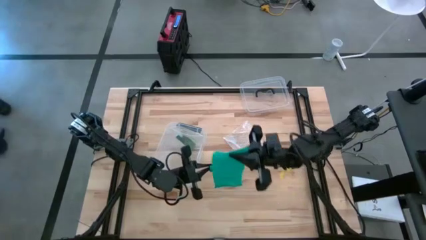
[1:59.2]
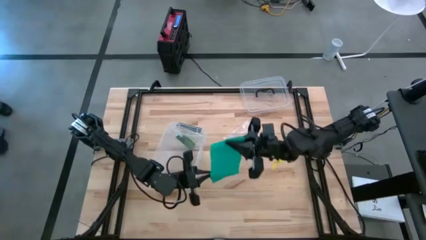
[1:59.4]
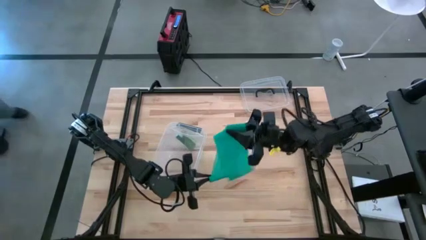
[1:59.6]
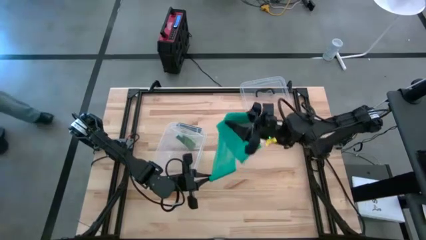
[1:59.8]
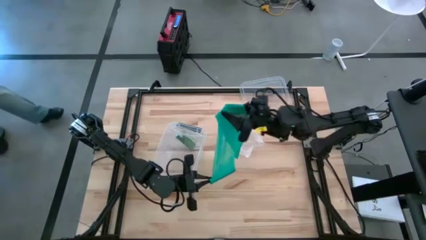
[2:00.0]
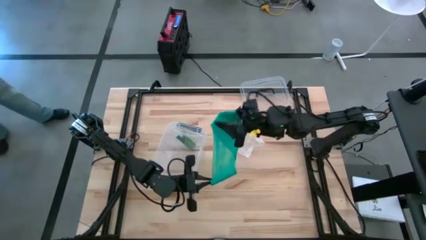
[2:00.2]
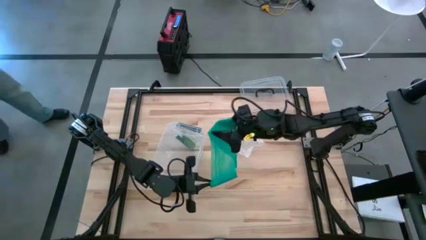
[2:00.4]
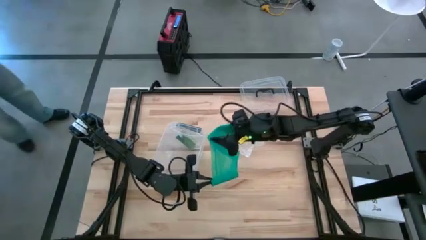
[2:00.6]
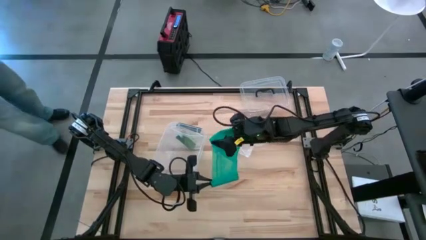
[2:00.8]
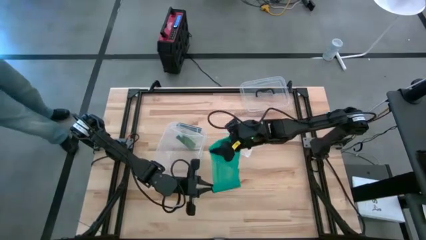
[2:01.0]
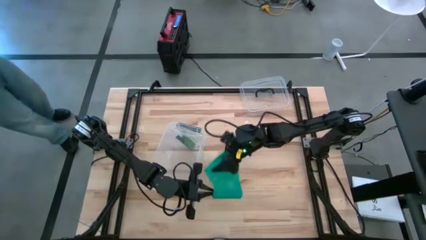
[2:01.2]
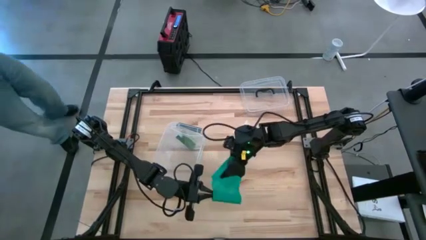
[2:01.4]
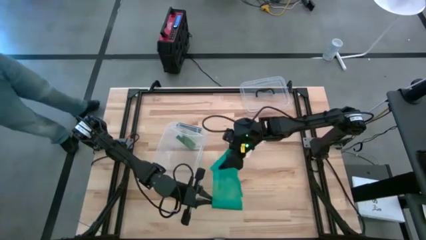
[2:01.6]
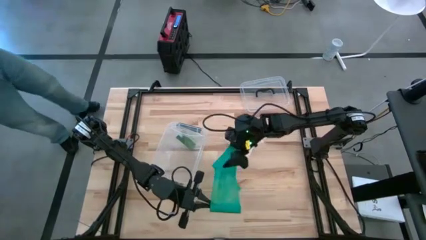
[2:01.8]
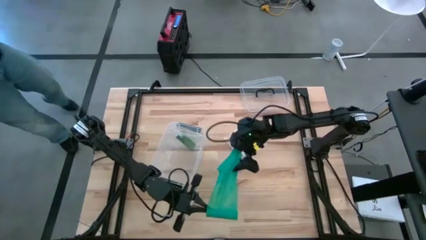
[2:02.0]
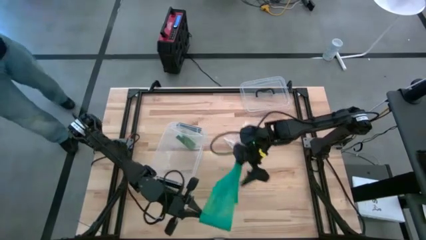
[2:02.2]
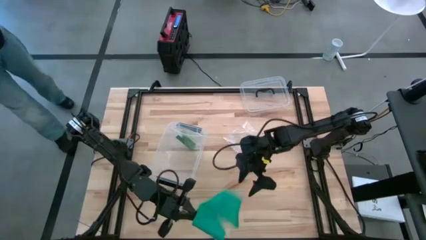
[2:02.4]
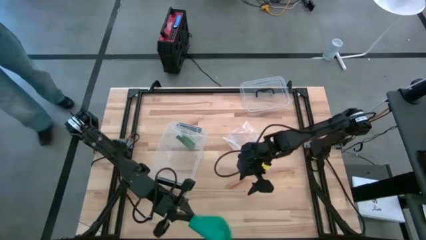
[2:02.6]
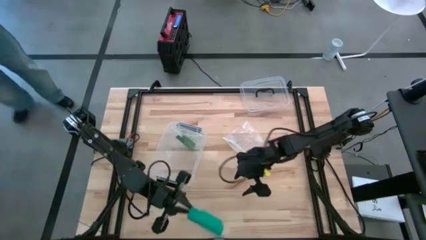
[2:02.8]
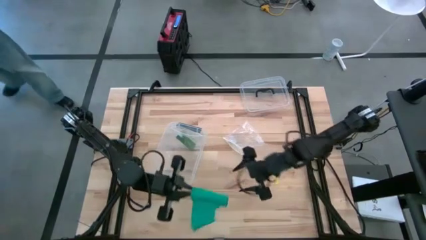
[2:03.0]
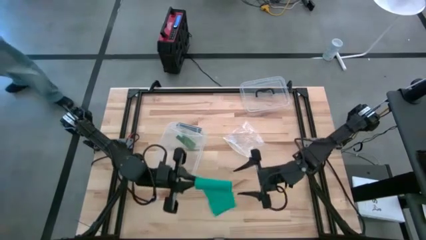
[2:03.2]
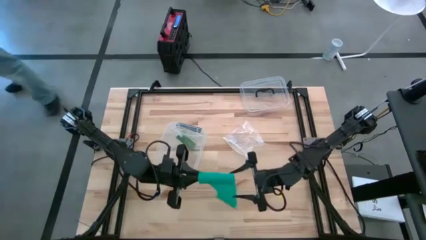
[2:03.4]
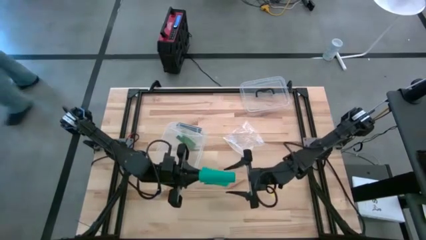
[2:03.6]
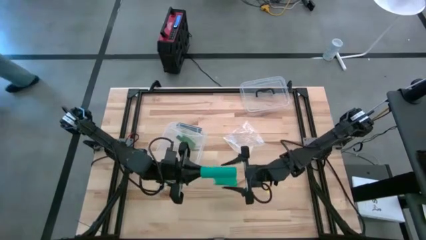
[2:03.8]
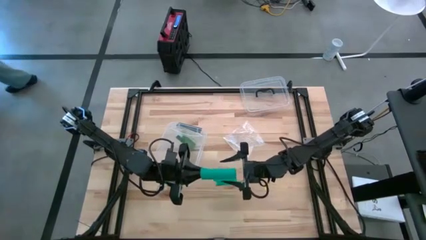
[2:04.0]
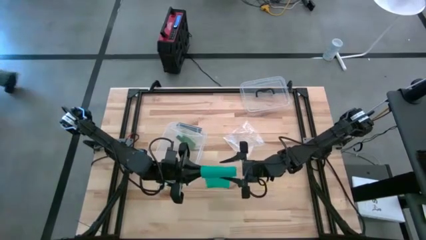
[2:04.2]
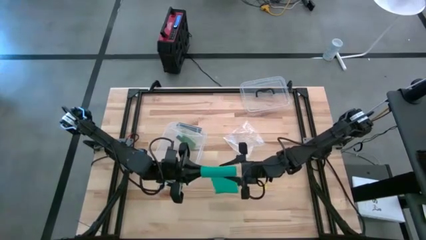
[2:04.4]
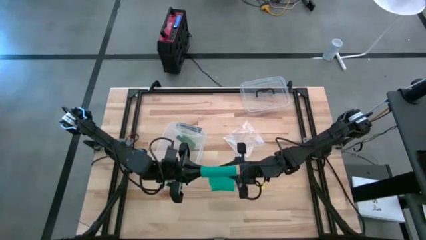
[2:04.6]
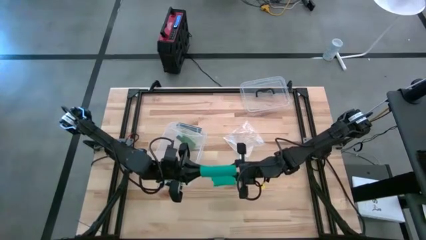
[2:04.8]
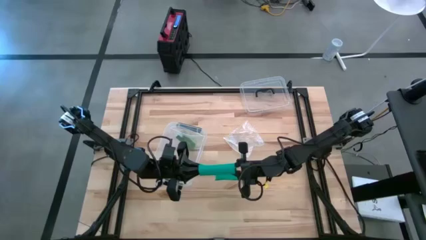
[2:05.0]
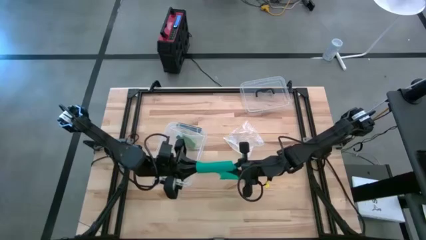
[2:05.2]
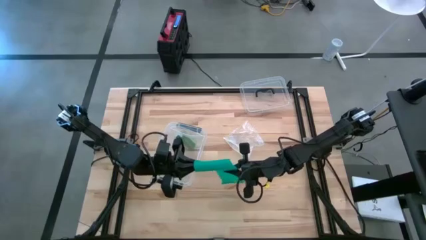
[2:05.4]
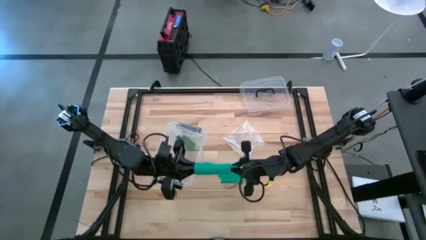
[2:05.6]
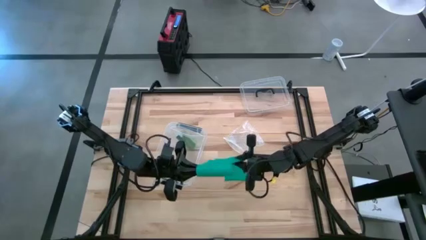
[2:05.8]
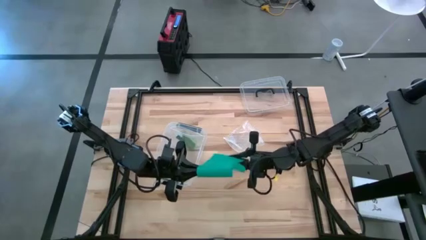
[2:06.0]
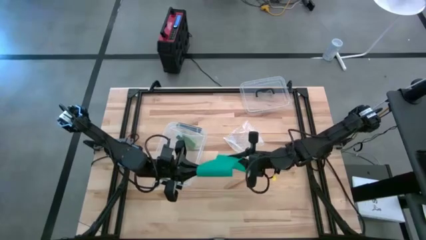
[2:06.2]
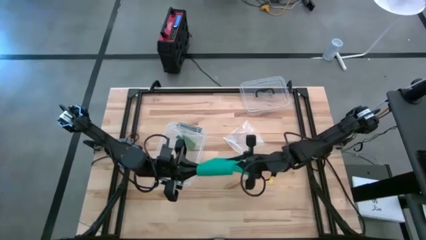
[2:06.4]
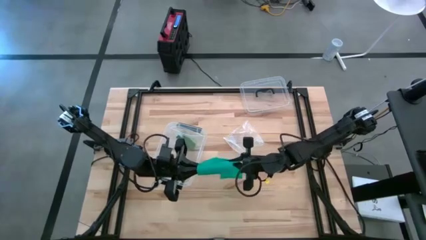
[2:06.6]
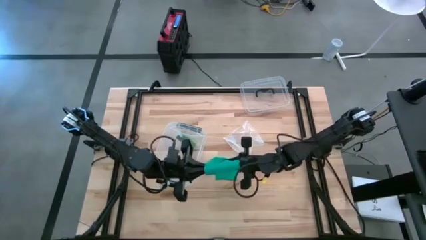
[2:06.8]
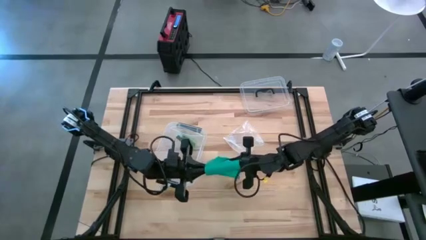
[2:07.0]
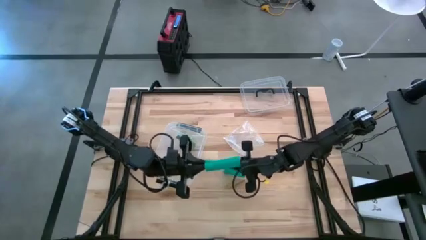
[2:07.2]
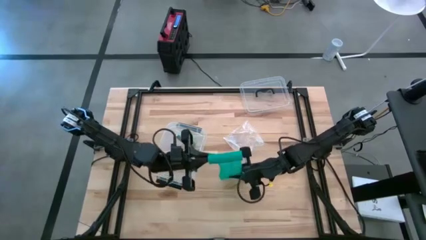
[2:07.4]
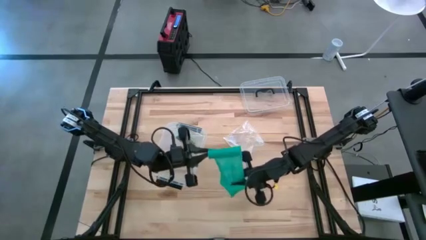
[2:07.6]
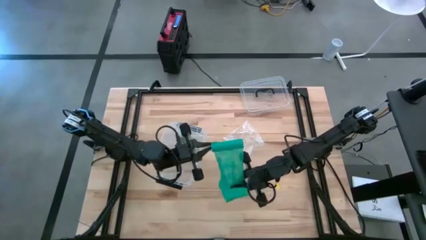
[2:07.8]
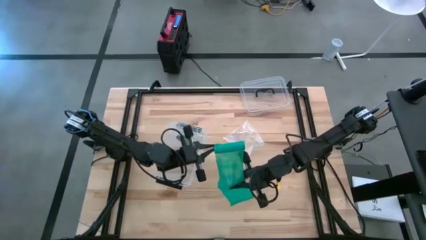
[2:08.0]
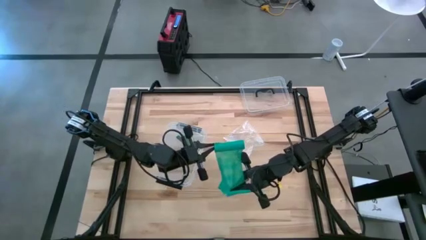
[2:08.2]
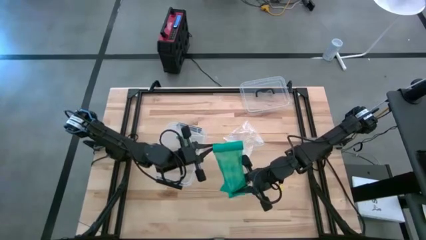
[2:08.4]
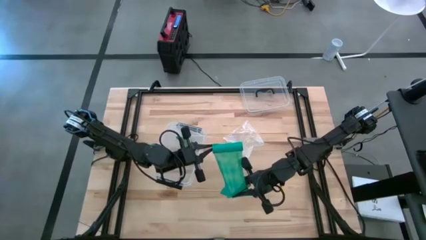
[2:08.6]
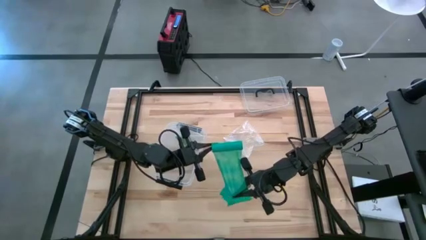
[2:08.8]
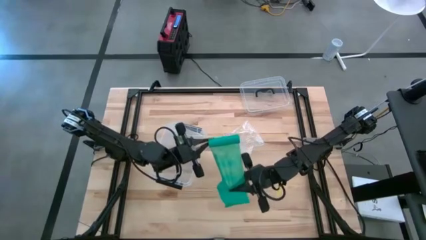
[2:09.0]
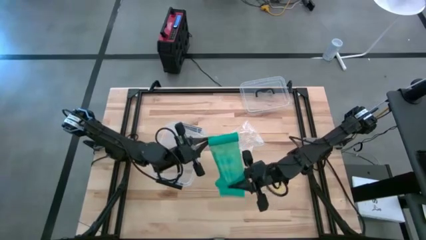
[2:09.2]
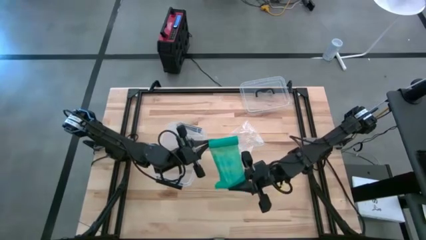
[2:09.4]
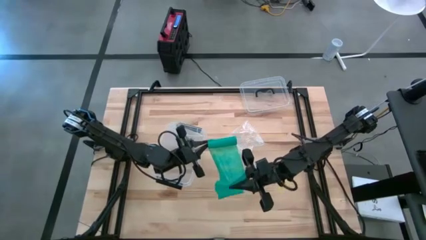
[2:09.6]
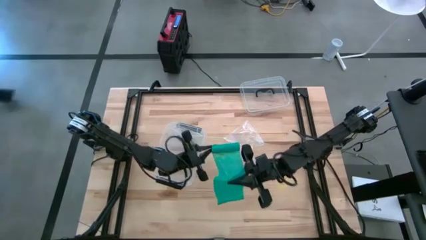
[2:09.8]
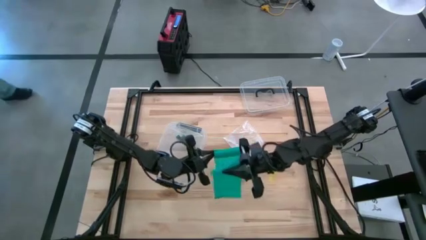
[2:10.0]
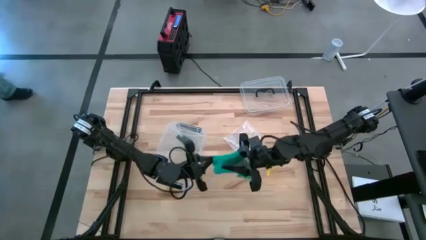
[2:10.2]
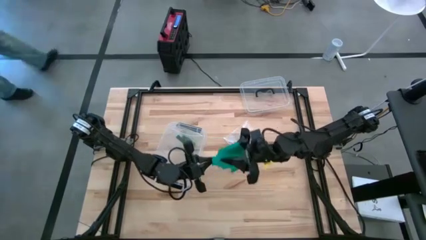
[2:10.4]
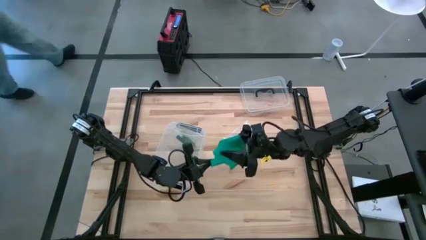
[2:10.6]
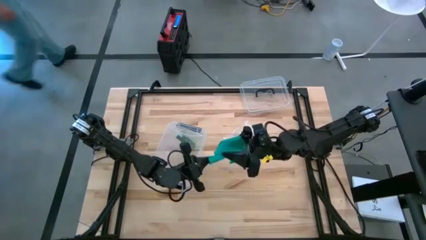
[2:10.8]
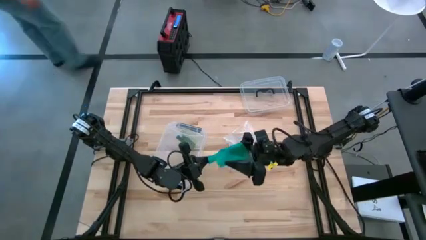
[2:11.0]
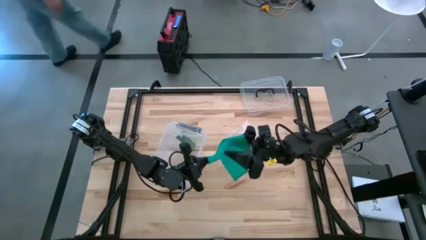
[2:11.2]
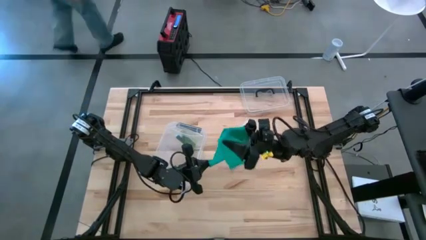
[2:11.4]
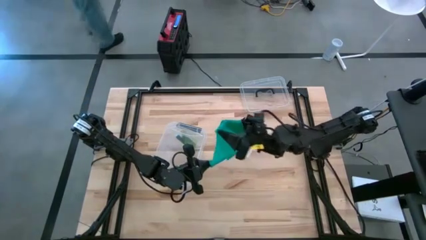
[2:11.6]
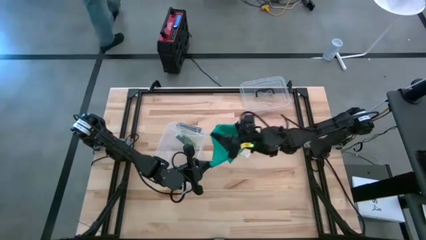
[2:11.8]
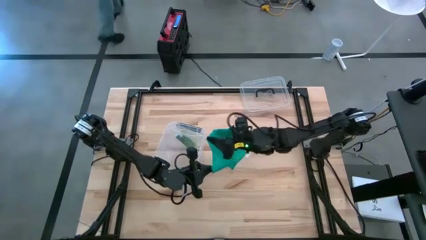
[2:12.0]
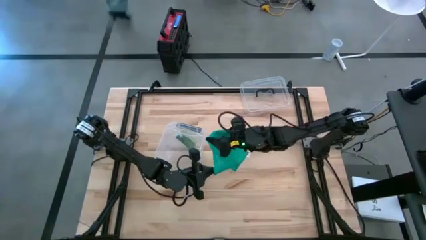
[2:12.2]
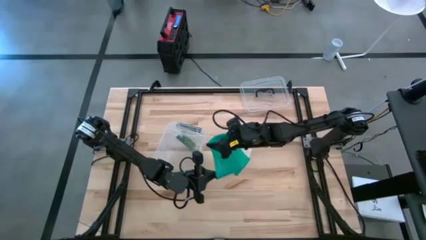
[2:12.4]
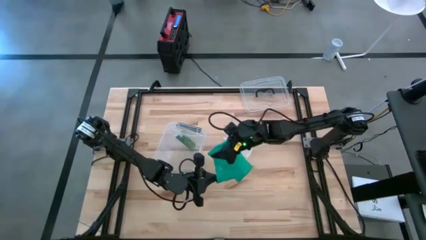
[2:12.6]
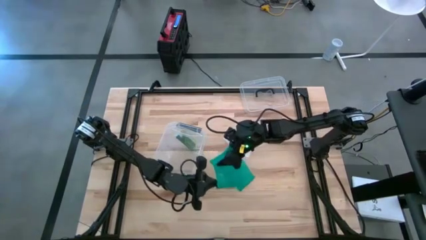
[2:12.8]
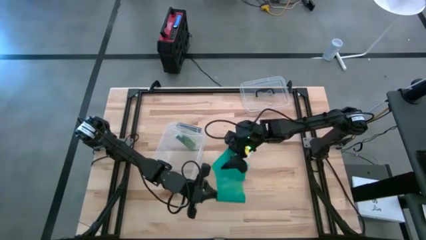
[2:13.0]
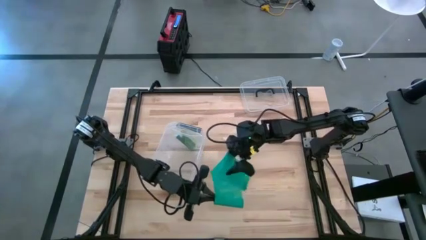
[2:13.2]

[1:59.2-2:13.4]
Task: Roll bandage
Roll the blue bandage

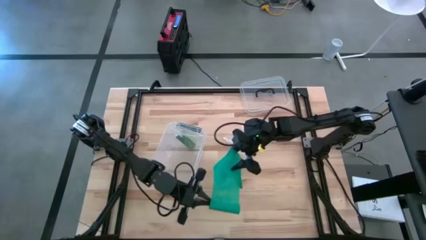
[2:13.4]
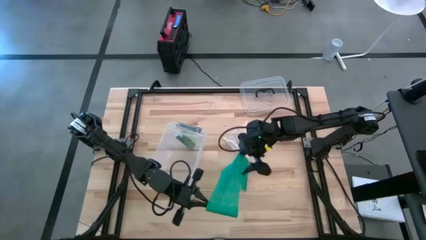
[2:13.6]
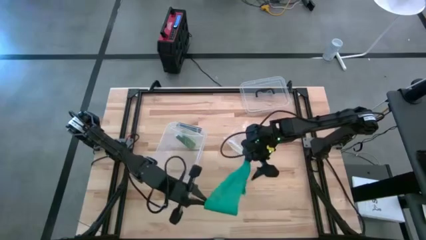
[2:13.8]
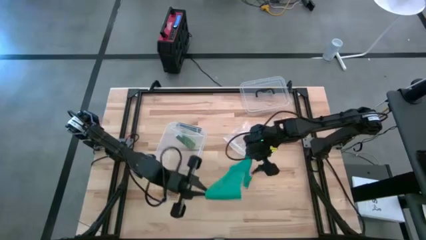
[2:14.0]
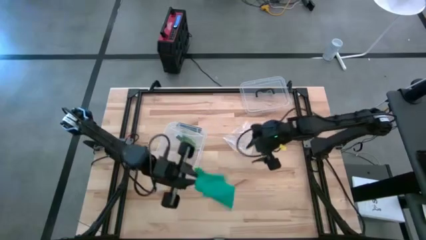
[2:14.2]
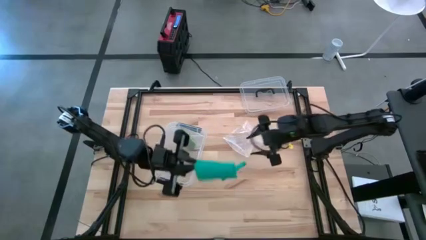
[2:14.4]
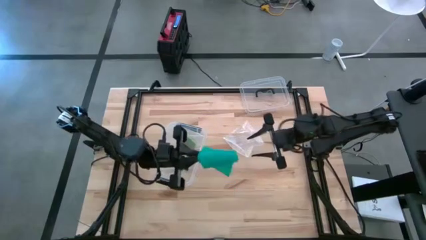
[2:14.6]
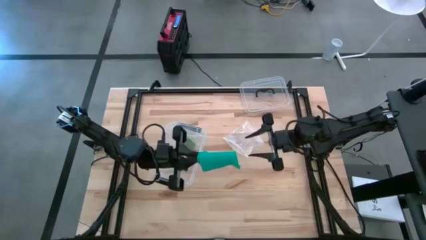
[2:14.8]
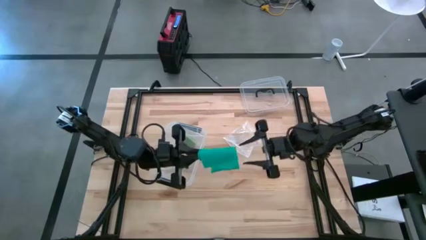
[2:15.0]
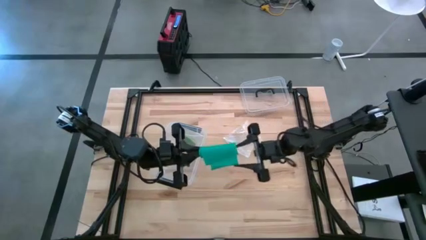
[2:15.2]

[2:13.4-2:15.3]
Roll the blue bandage

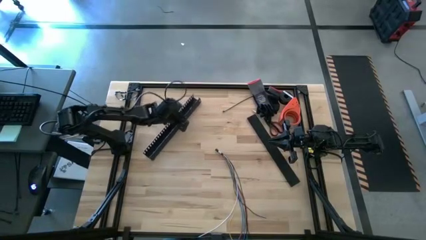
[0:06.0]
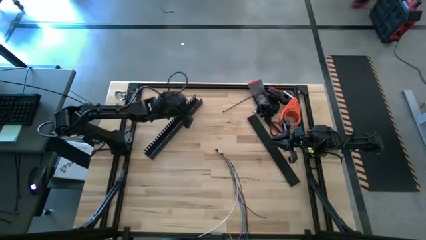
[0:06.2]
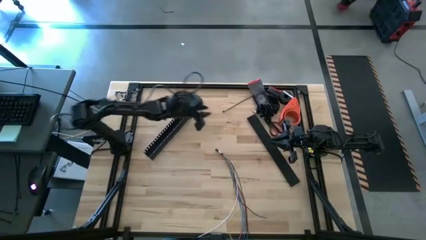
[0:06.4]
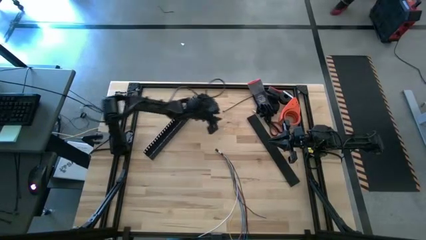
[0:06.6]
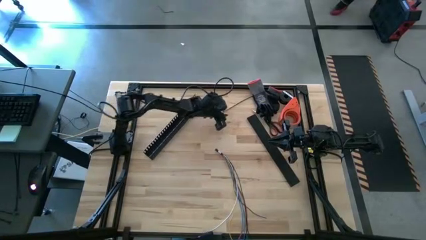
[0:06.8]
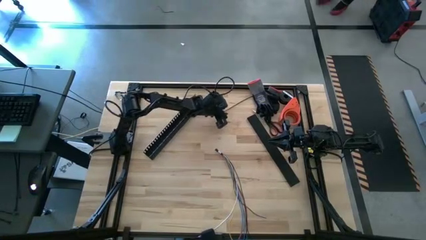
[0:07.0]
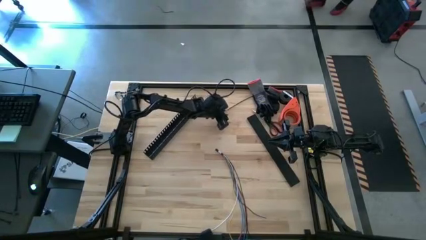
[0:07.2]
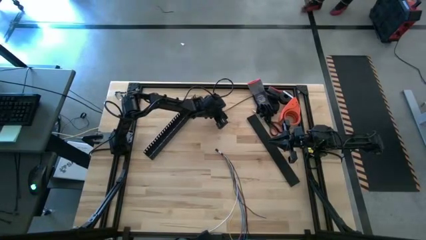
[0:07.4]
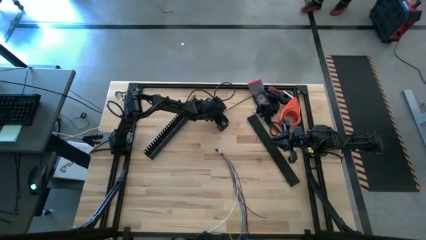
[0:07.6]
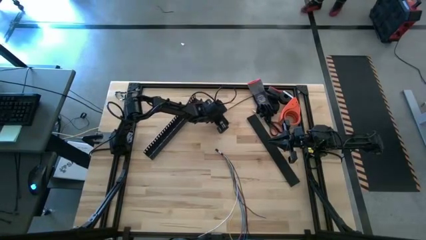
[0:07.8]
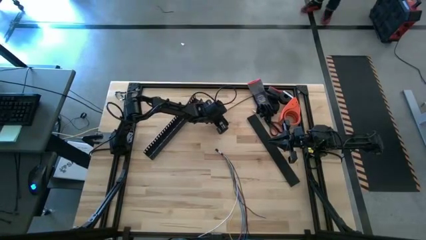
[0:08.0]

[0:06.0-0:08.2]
Task: Ziptie cables
Wrap the cables with a black zip tie
